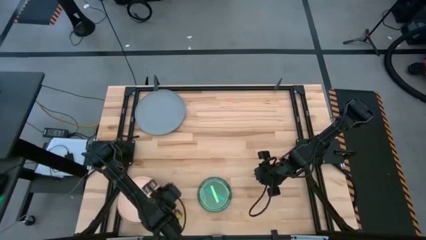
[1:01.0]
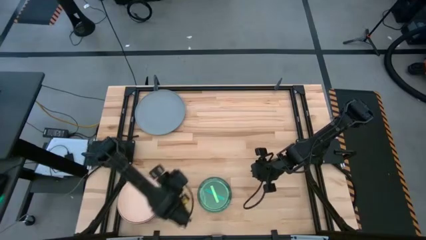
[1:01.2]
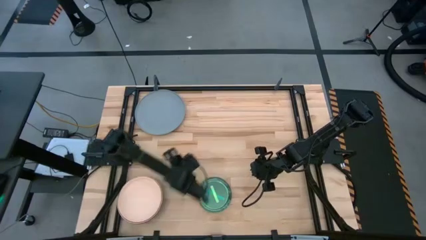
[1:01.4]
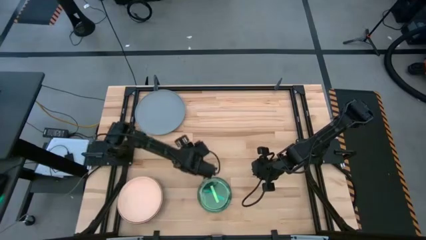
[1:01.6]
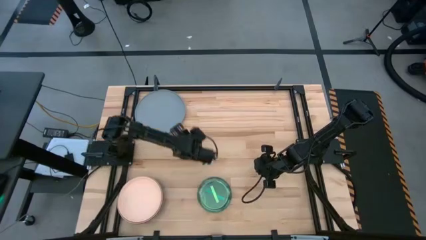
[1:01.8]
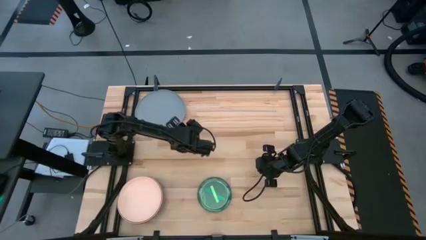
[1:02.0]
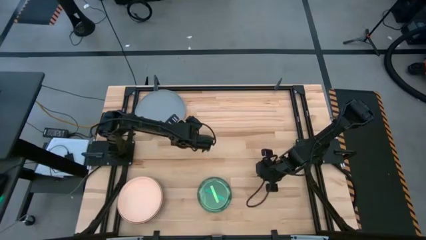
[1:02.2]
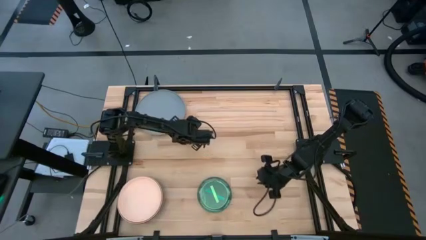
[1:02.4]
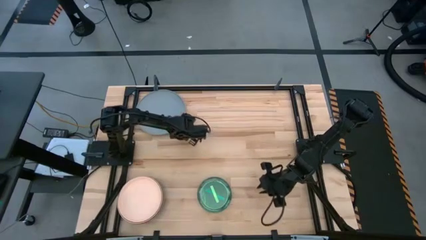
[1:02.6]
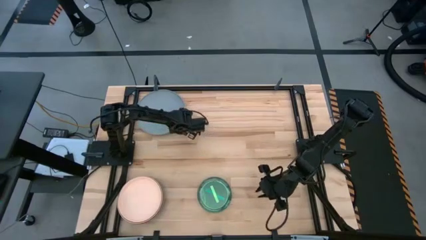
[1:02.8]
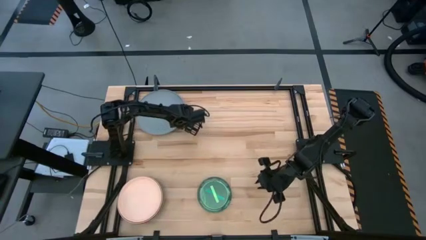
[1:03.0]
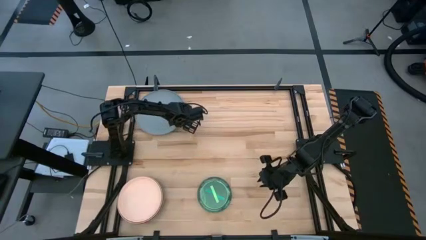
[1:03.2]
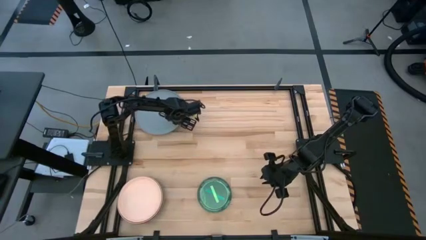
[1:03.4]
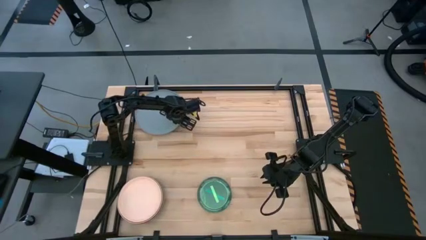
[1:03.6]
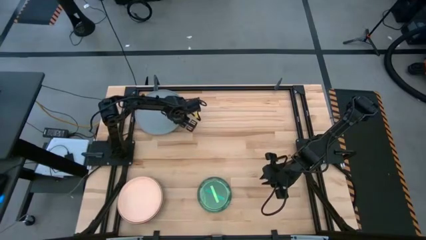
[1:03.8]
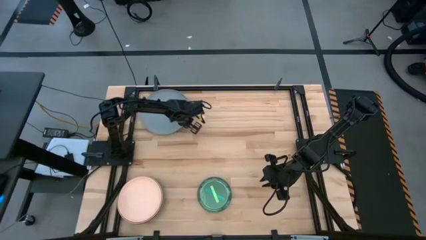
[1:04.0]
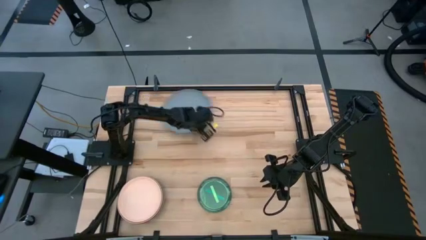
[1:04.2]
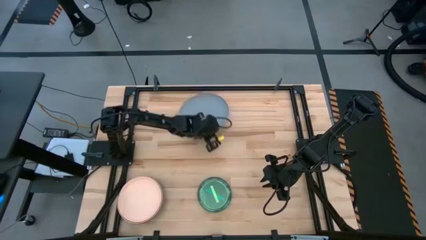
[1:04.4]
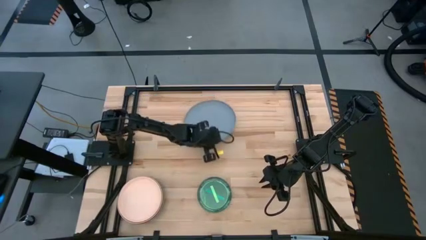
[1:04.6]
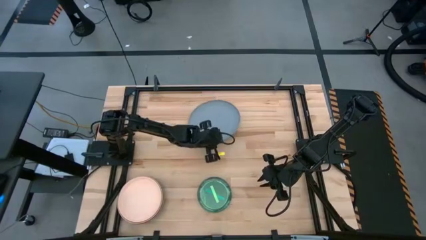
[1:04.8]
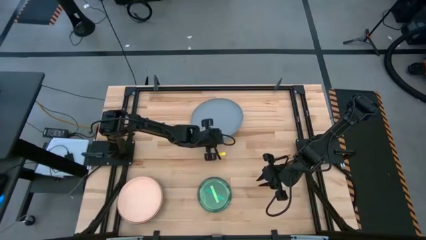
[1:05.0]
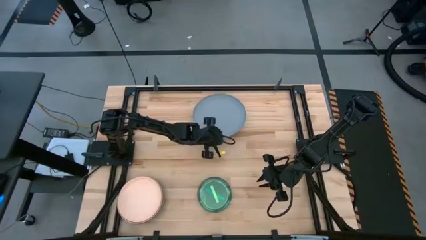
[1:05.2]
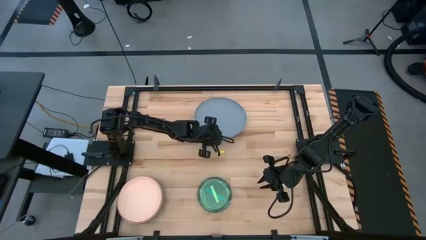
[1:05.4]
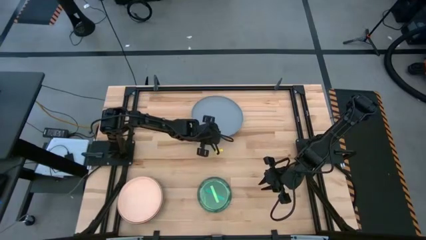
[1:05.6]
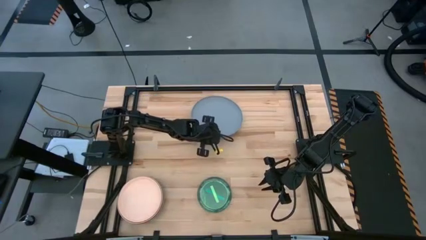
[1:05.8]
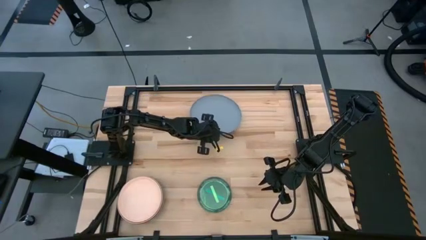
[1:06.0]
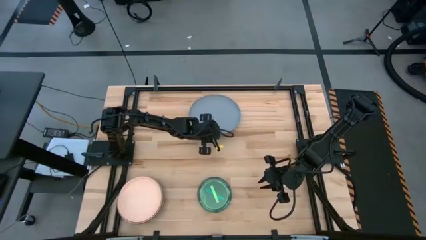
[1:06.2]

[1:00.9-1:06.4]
Task: Stack plastic plates
Move the gray plate to the middle of the table

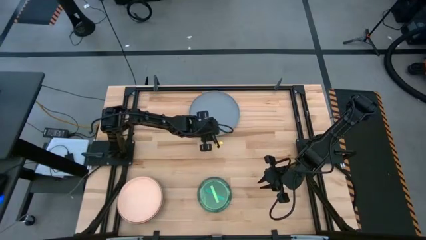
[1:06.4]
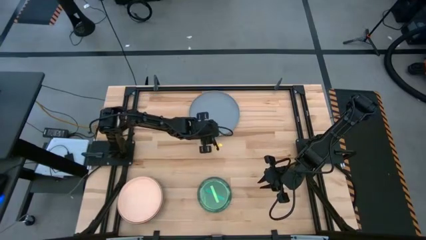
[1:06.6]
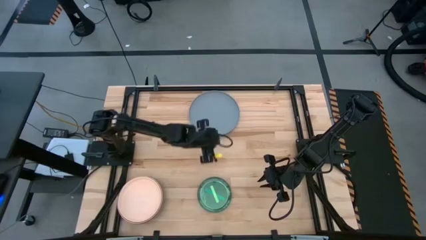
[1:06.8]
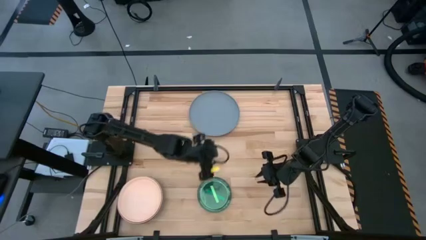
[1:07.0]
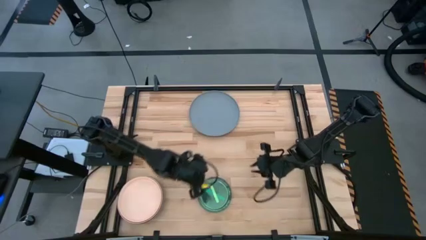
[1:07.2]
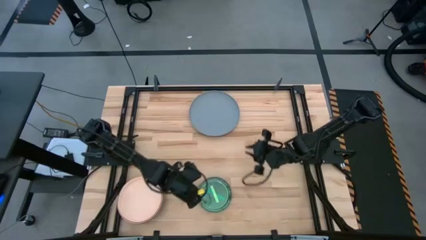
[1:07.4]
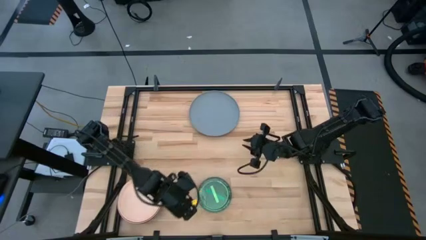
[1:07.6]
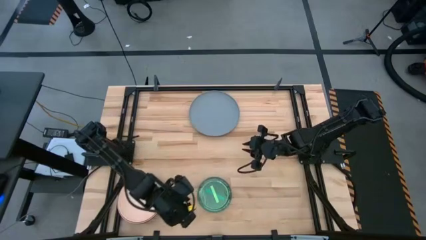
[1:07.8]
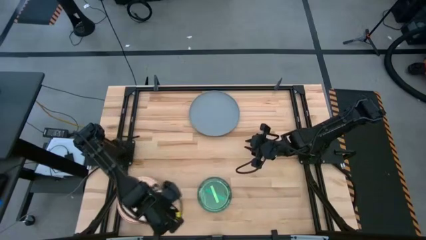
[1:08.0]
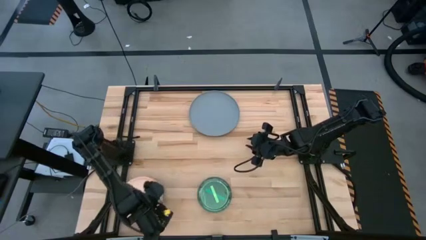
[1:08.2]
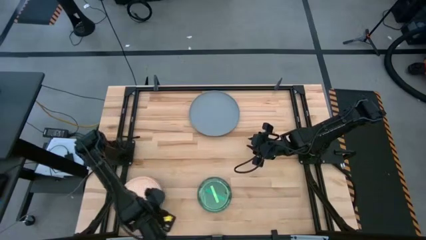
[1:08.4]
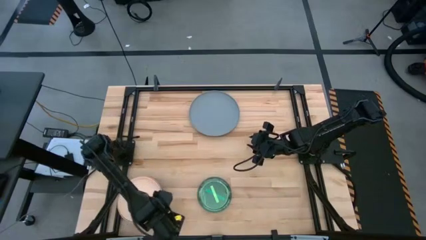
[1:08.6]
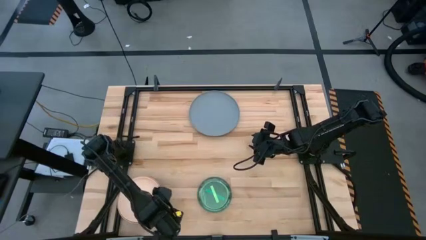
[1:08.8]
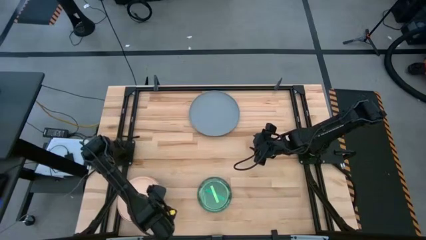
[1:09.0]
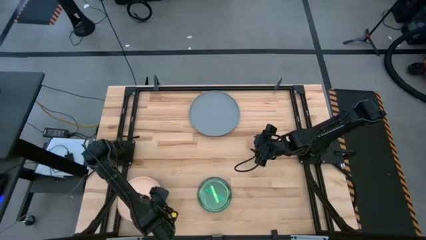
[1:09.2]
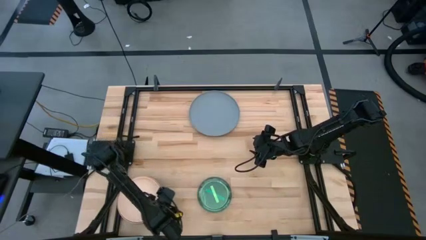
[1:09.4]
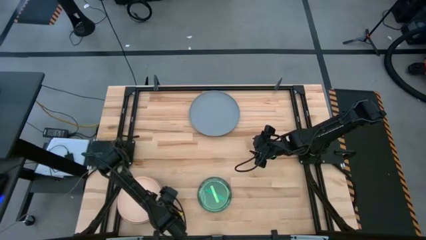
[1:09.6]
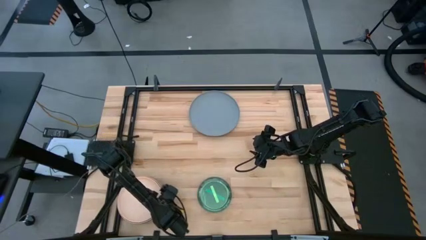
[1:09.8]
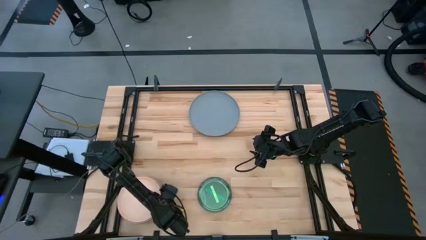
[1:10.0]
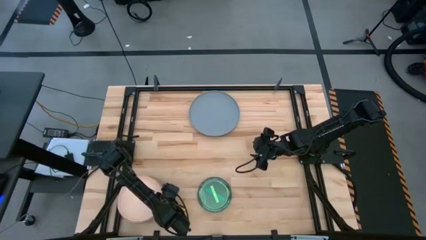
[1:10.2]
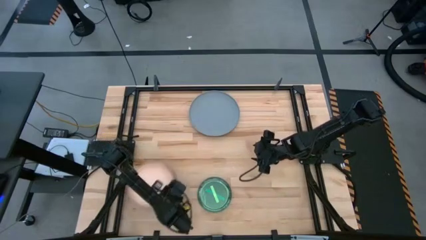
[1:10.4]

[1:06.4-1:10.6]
Stack the plates on the gray plate

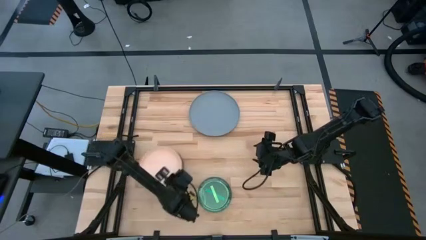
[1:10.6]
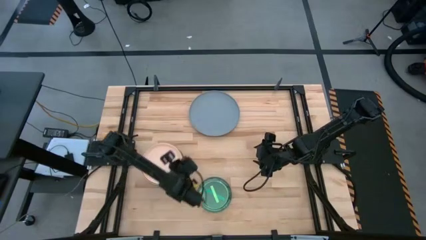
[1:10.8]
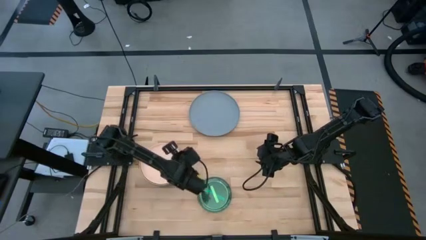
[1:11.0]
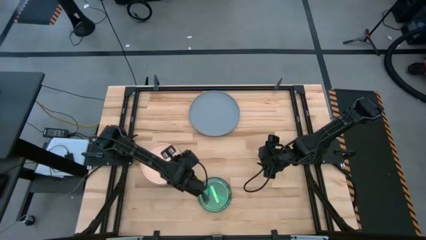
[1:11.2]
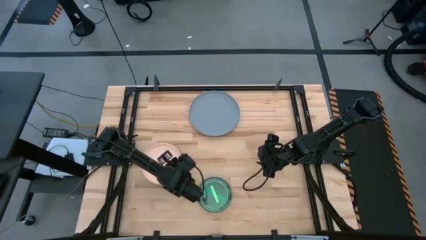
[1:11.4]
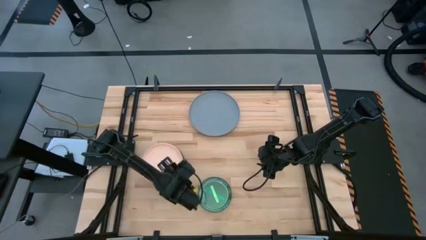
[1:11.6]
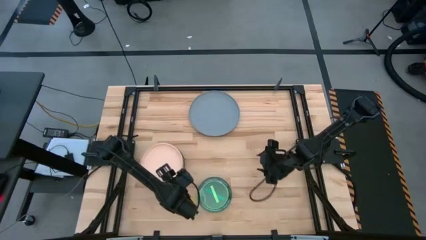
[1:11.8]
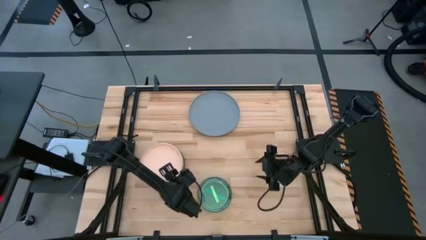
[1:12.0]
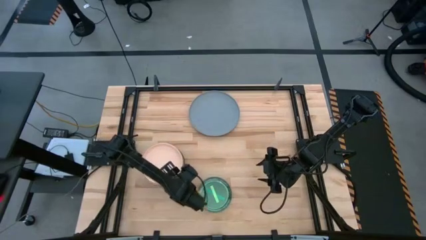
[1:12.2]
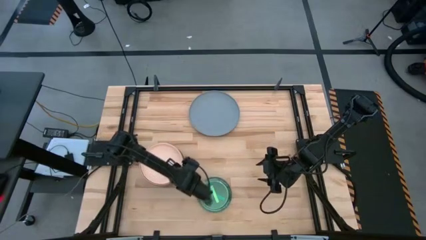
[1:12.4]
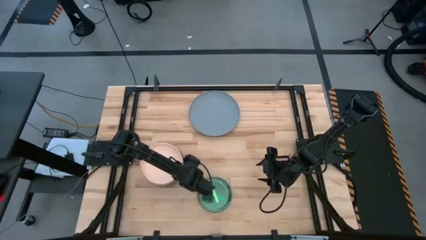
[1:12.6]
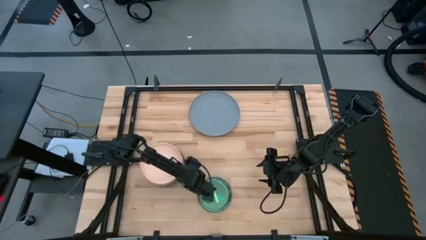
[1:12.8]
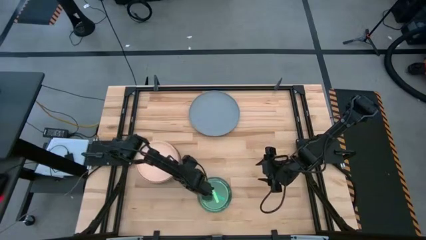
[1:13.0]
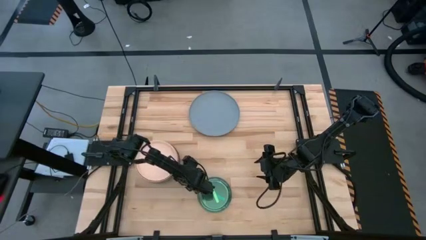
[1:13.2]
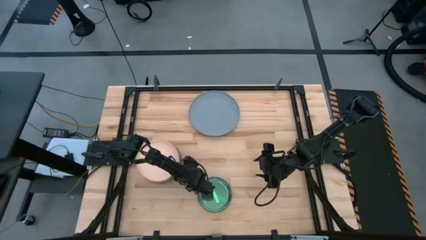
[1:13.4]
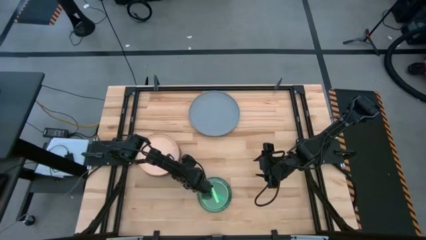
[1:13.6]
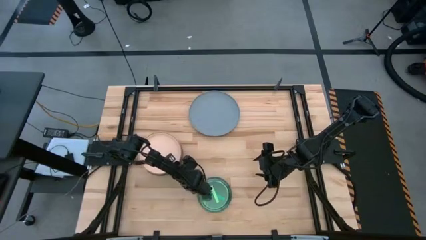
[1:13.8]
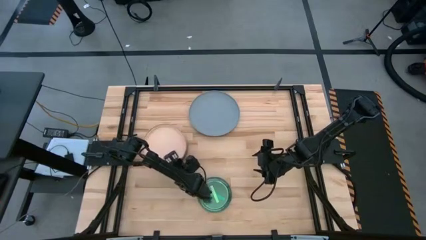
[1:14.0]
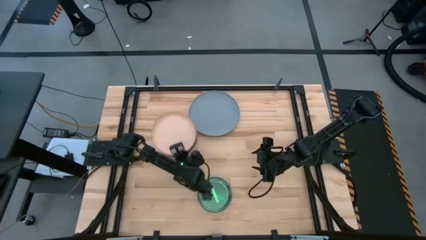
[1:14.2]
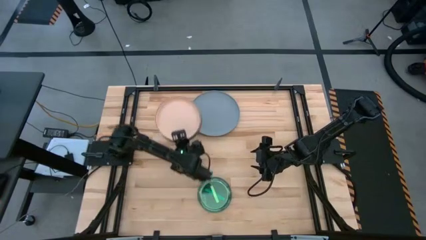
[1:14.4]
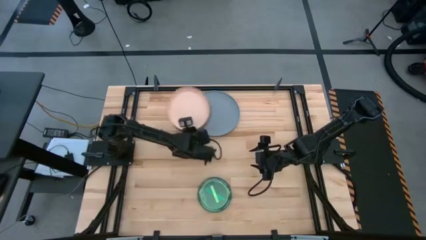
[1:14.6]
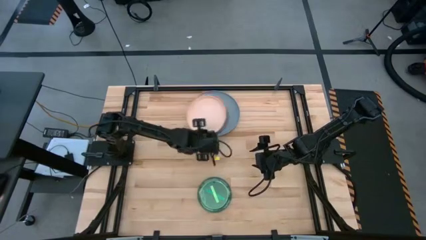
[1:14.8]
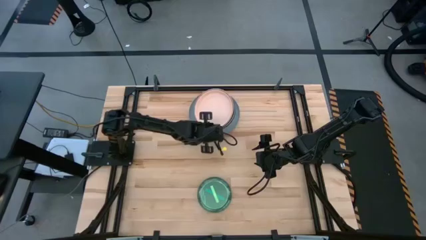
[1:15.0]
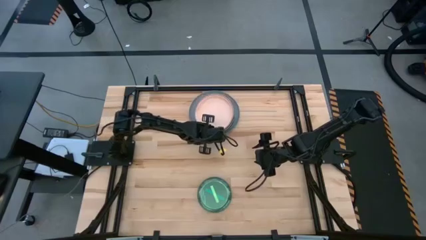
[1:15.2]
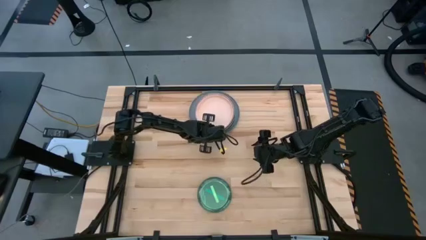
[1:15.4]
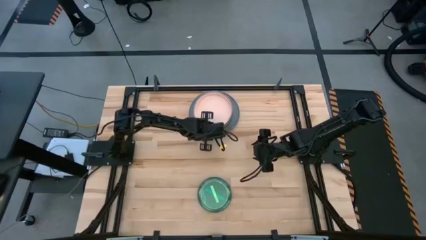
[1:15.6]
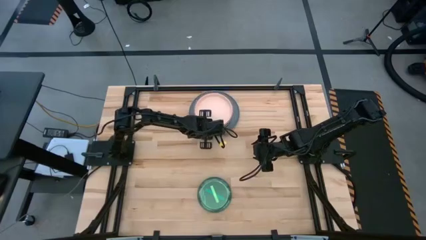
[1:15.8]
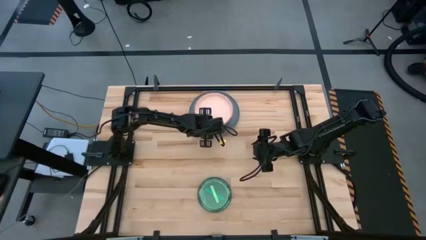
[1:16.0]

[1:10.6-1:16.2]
Stack the plates on the gray plate

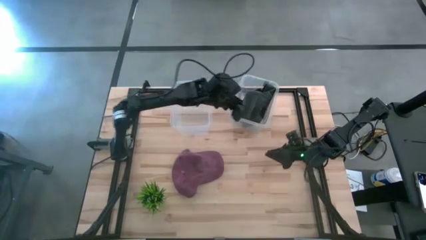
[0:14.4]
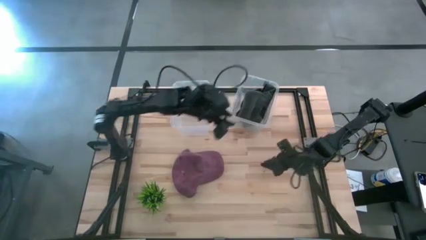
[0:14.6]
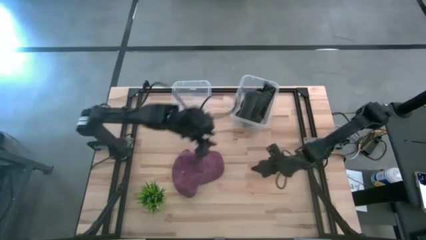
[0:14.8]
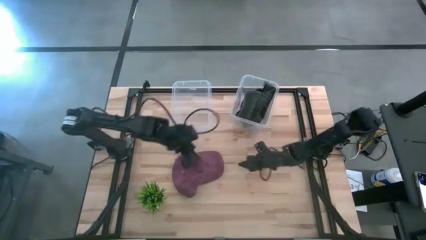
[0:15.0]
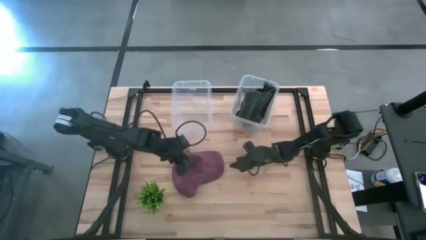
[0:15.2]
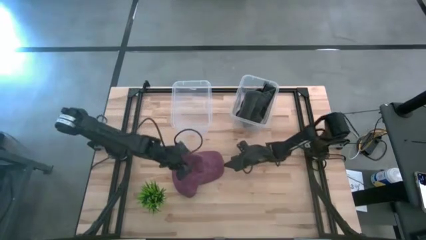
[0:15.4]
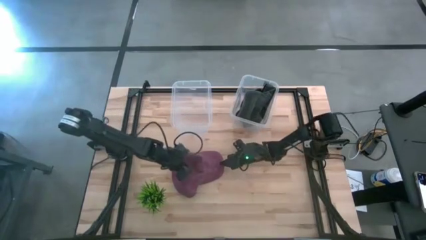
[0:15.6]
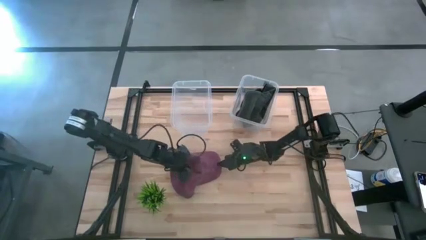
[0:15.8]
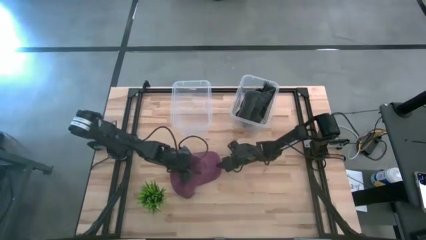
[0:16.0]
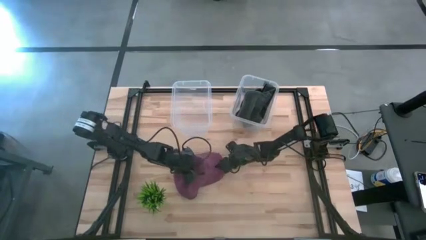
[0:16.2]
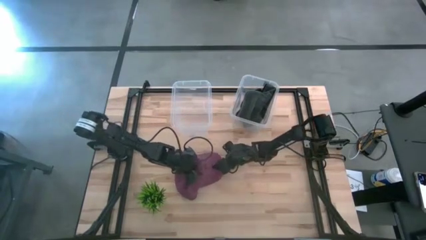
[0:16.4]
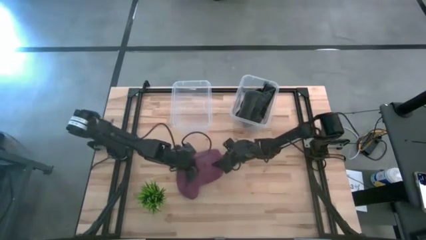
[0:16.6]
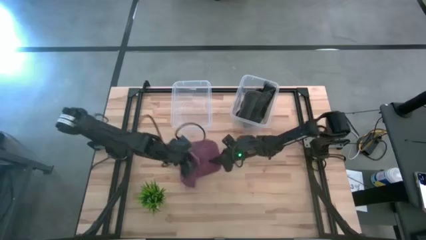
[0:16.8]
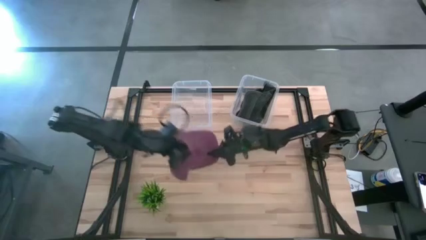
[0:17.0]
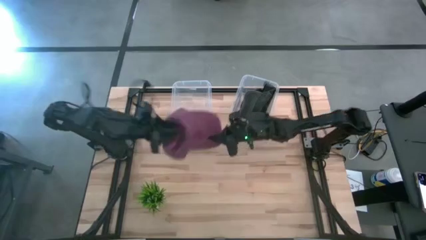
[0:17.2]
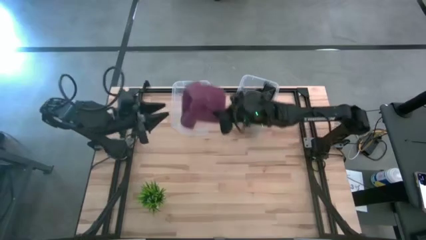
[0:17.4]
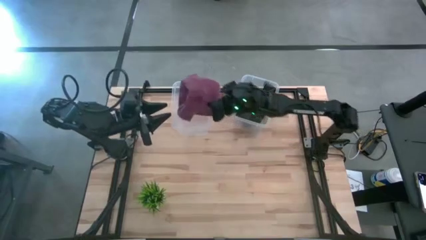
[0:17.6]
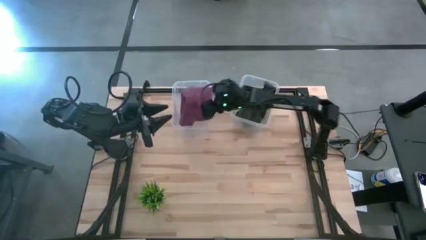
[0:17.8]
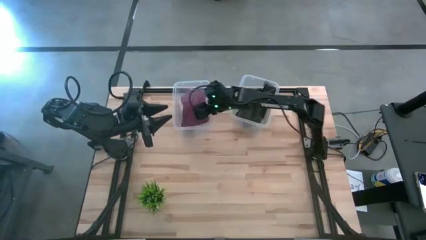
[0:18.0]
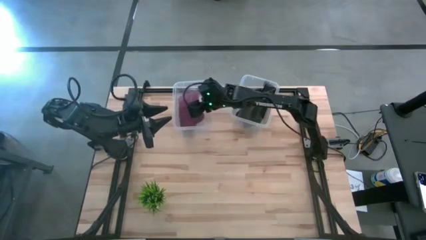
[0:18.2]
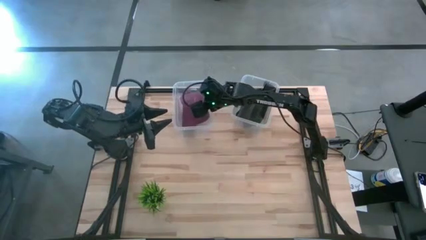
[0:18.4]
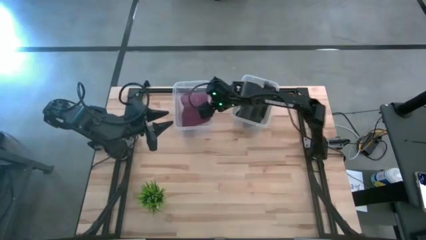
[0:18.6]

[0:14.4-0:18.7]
Task: Pick and place caps into container
Put the dark red cap into the left transparent container
